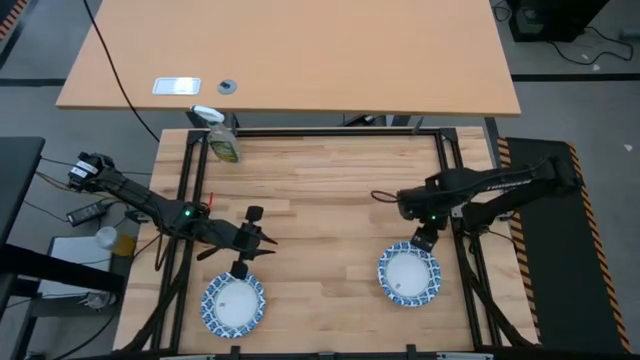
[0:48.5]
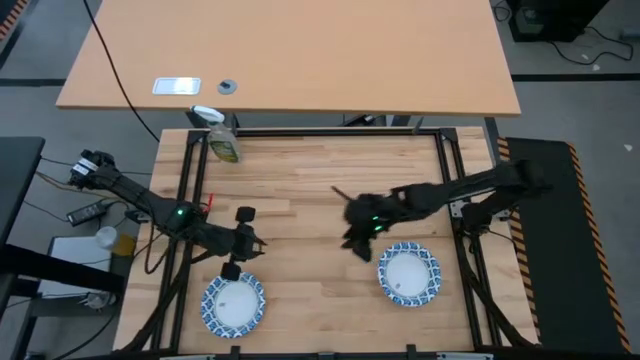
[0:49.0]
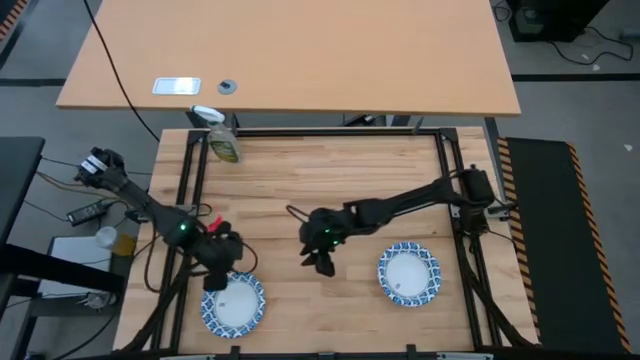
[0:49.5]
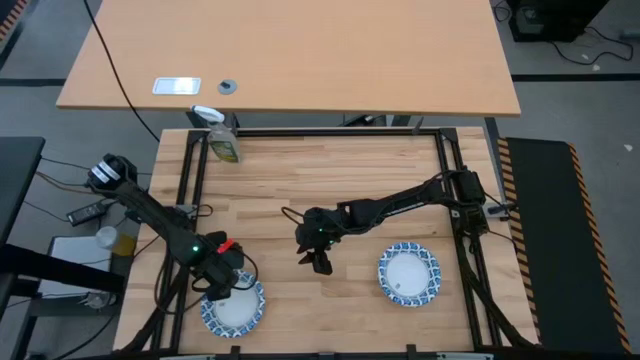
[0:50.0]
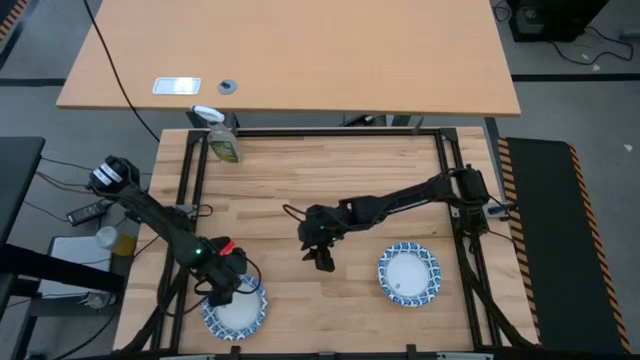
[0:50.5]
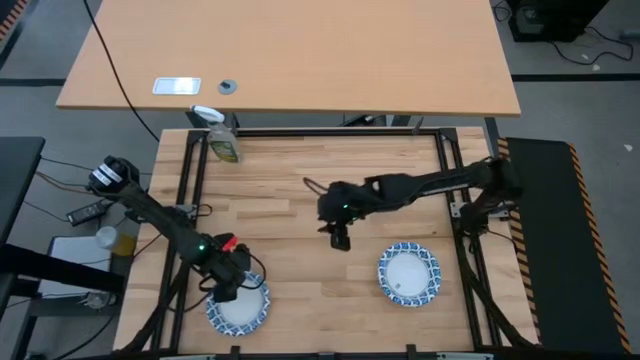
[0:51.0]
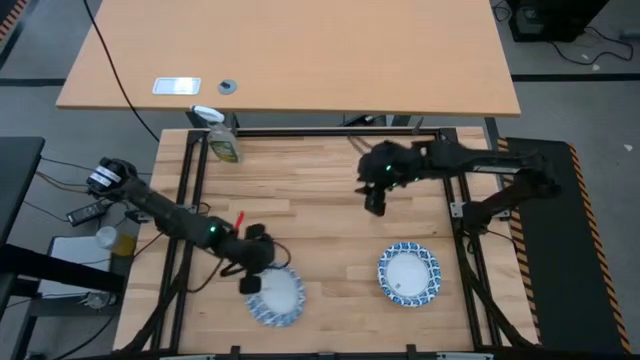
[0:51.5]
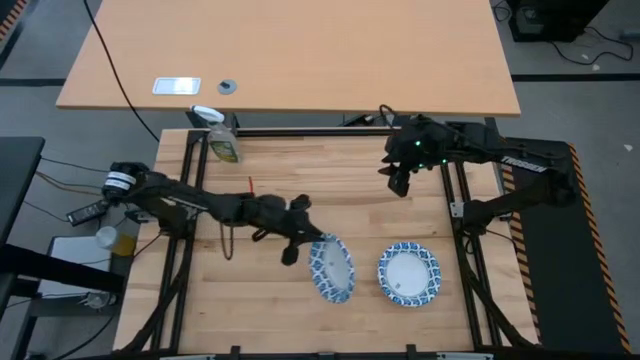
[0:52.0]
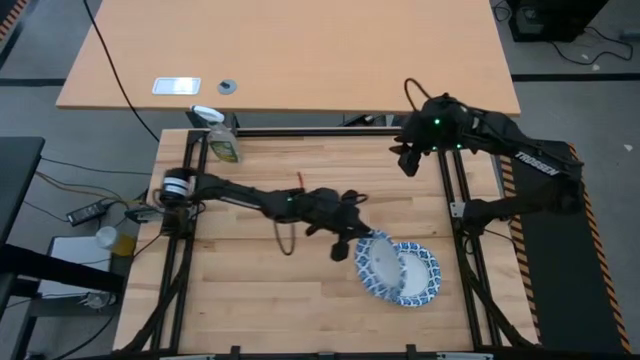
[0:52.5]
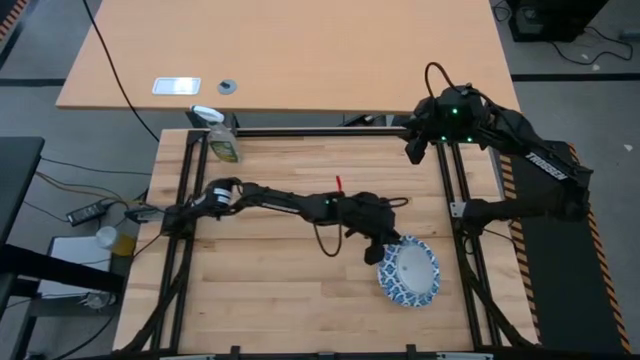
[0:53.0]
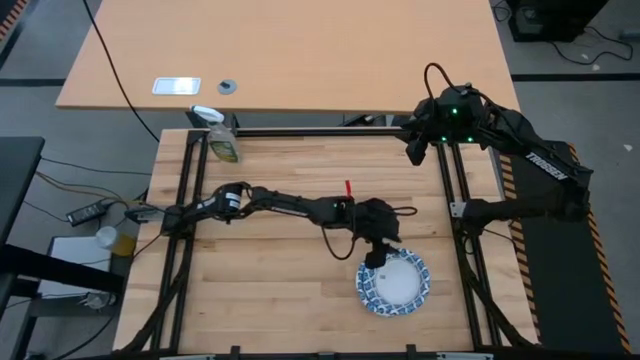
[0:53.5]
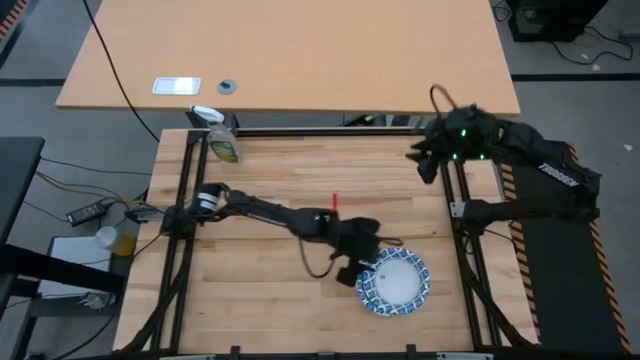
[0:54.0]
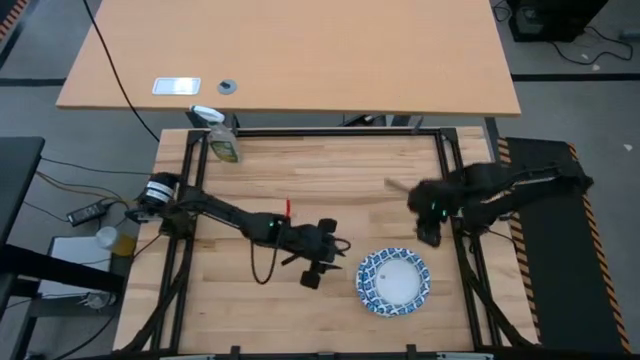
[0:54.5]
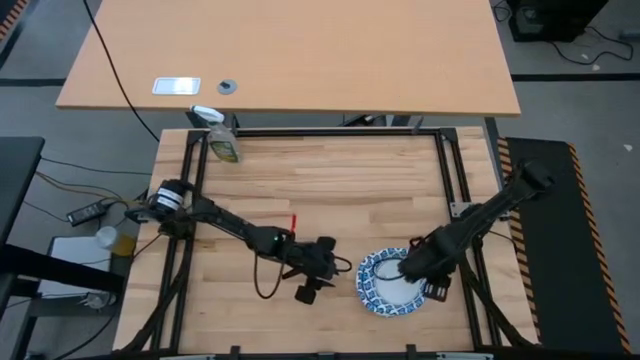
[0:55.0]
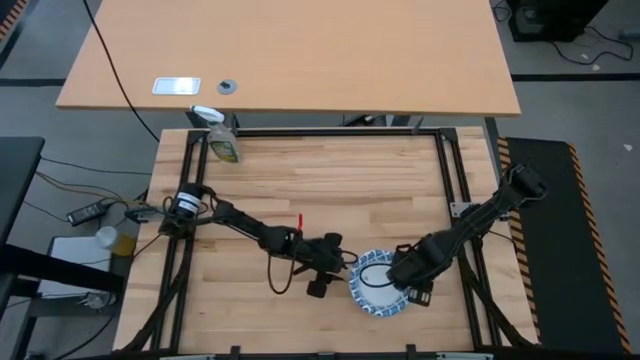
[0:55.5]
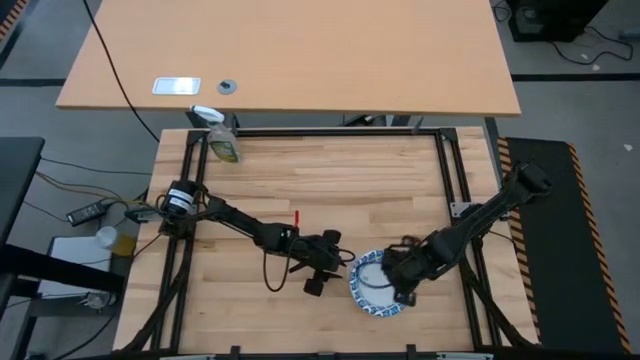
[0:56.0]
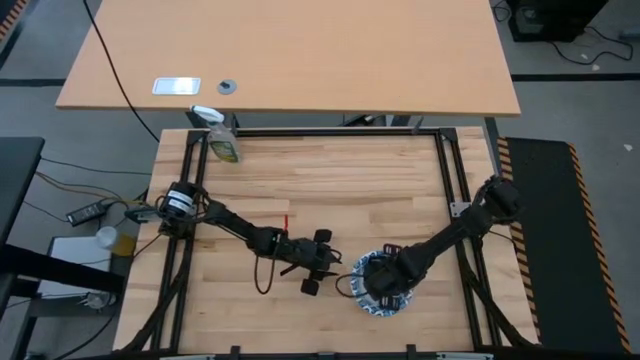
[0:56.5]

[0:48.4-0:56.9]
Stack the white bowl on top of the stacked white bowl

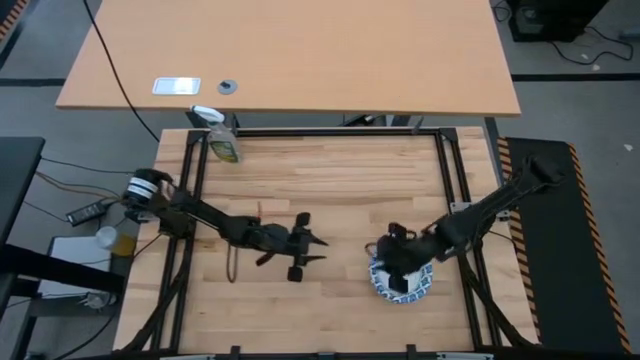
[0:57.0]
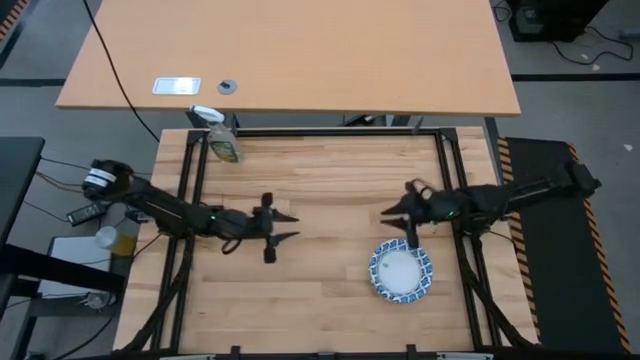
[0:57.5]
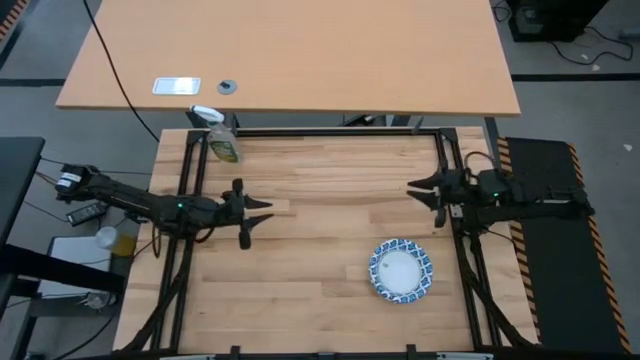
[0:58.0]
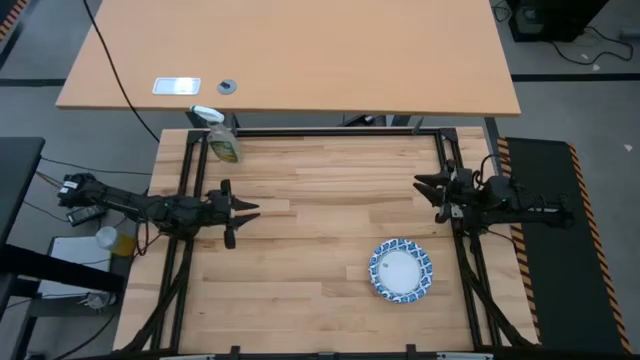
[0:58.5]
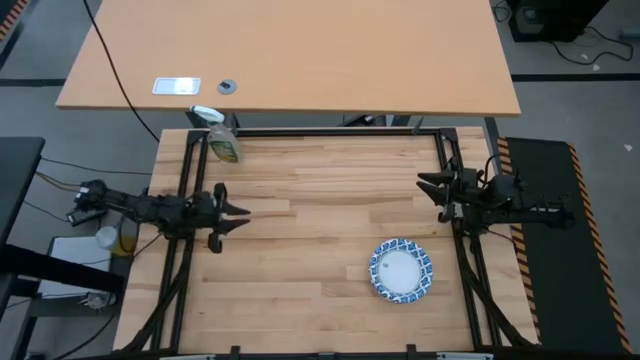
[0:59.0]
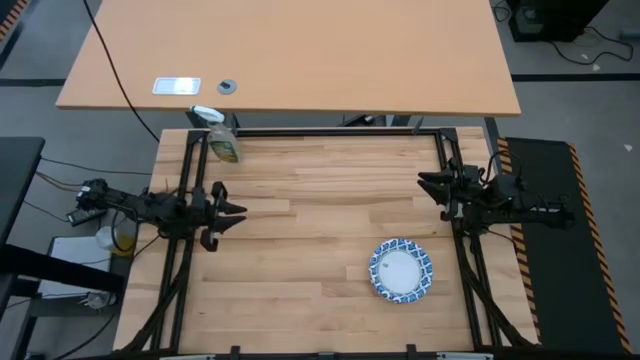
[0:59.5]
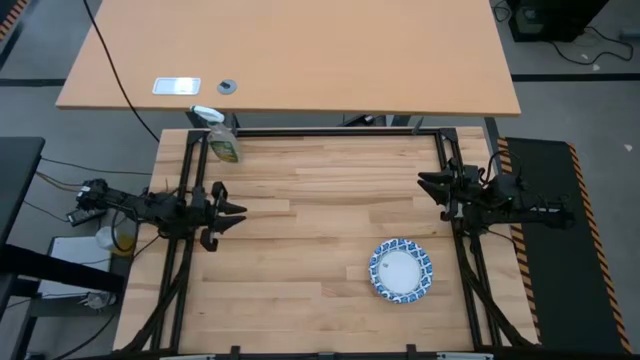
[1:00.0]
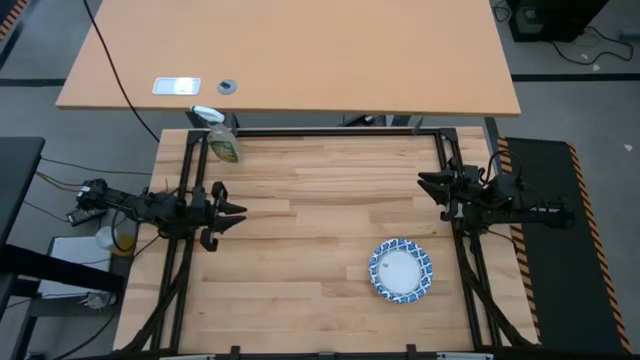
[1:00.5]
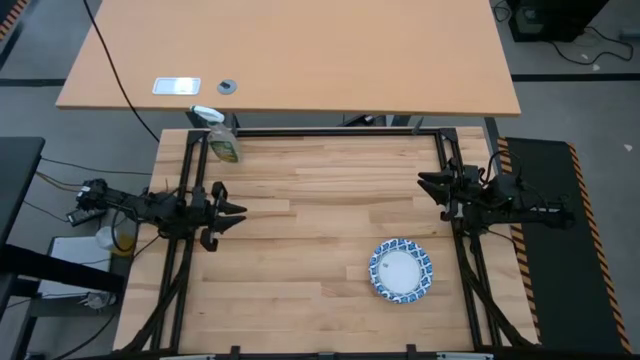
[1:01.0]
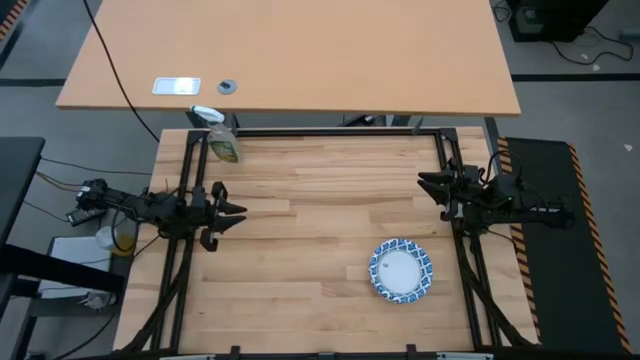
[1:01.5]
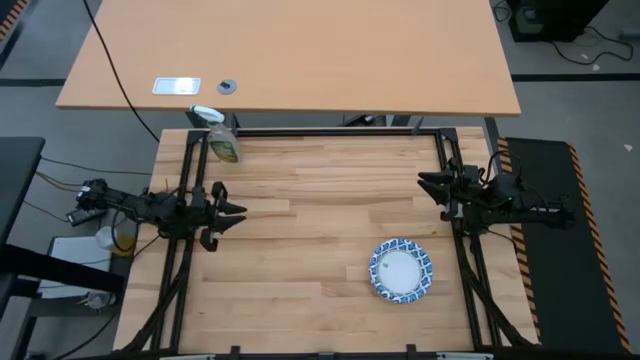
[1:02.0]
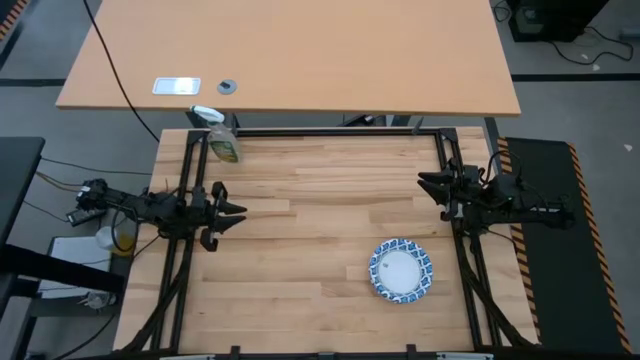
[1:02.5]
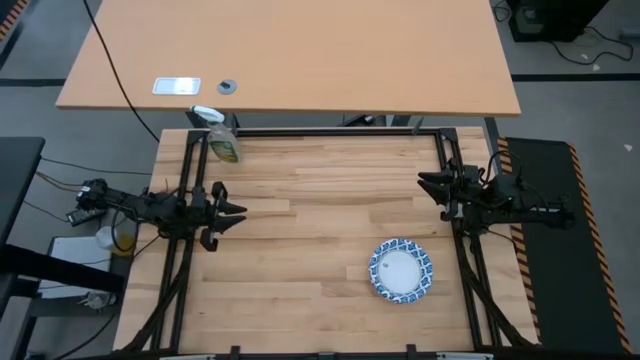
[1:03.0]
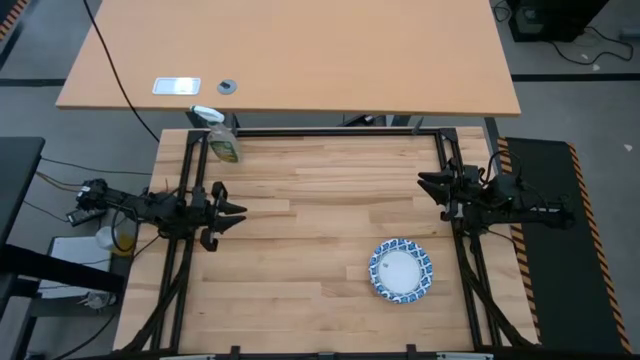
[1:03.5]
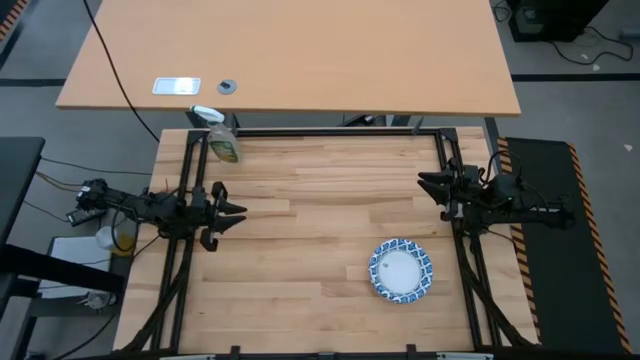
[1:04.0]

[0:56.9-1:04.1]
Return to Home Position

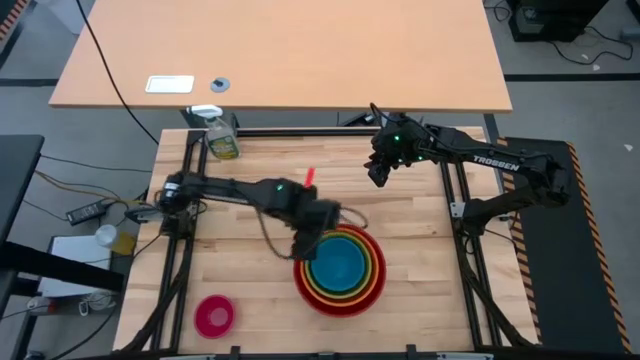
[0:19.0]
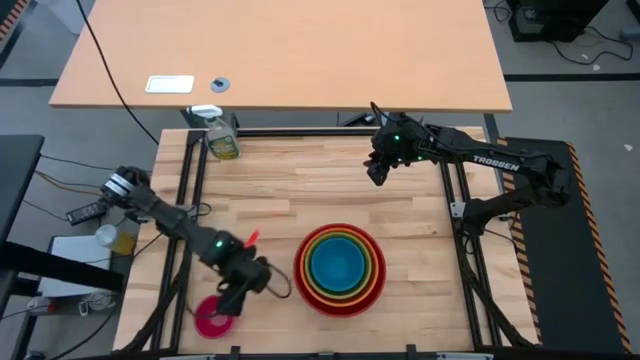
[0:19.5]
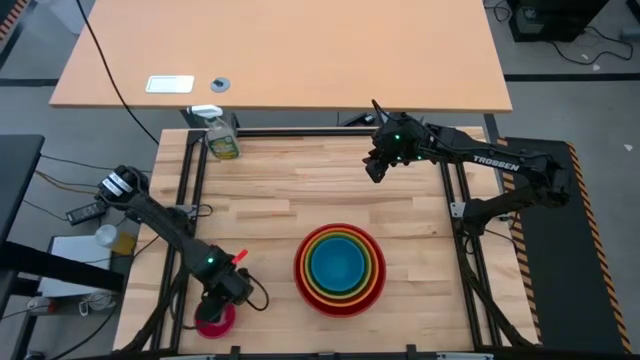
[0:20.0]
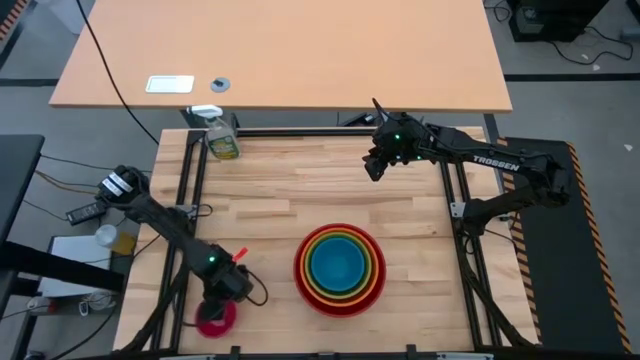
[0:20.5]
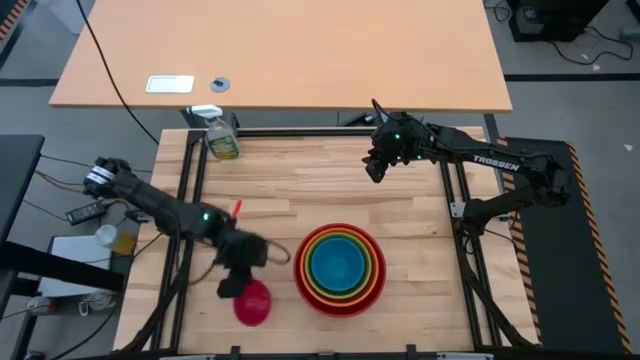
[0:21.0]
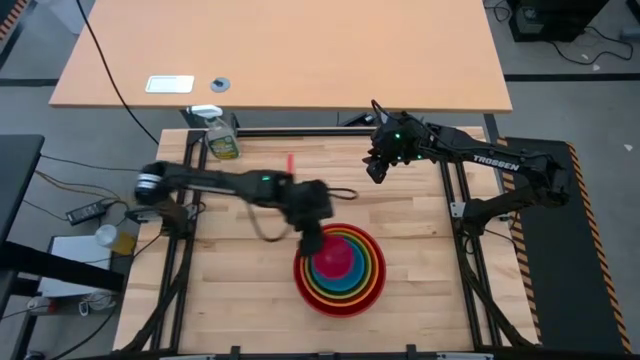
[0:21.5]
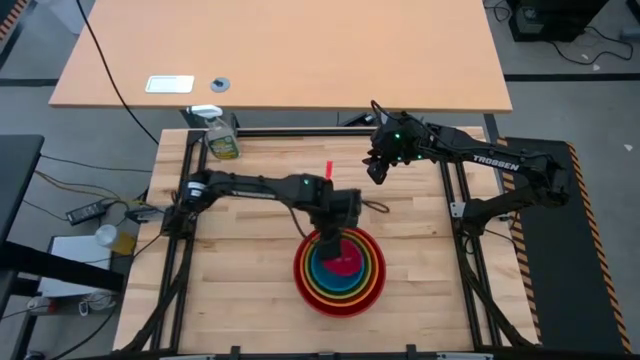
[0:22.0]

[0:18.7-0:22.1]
Stack the pink bowl on top of the blue bowl
